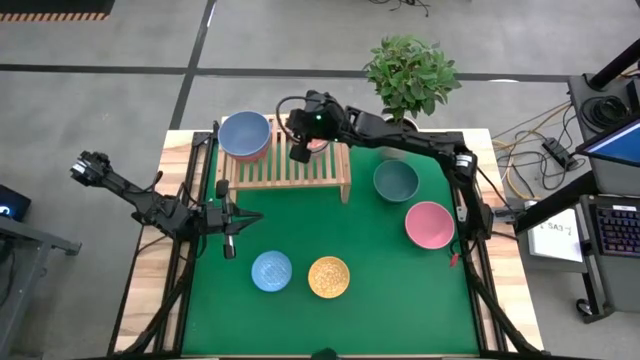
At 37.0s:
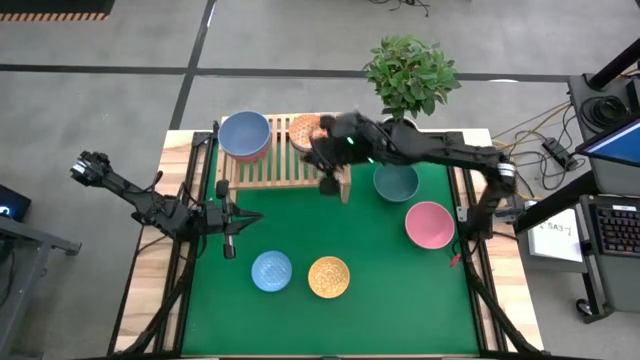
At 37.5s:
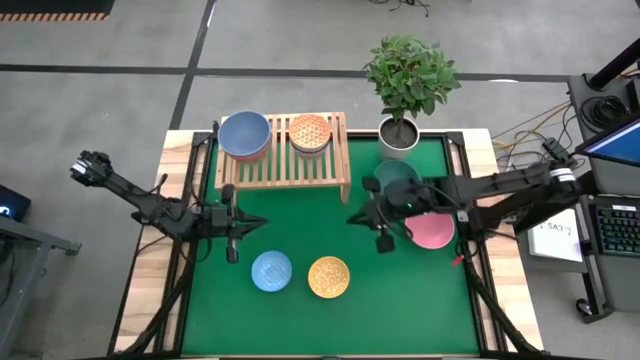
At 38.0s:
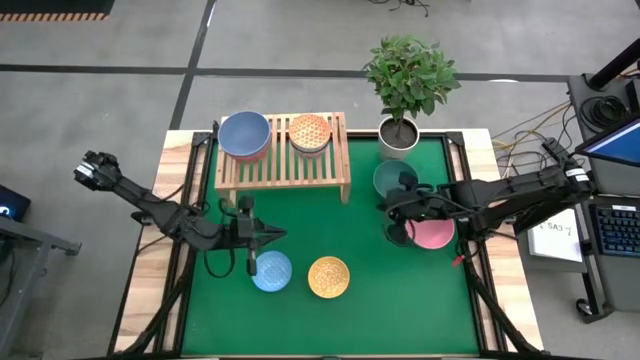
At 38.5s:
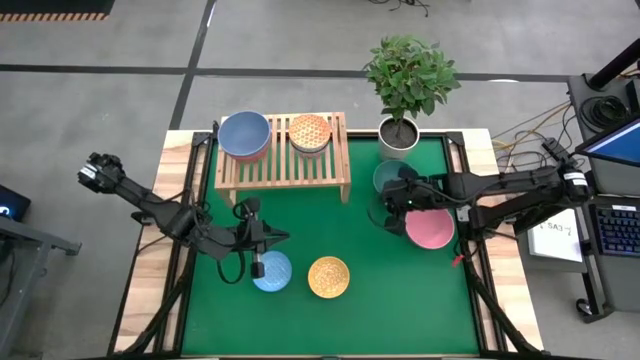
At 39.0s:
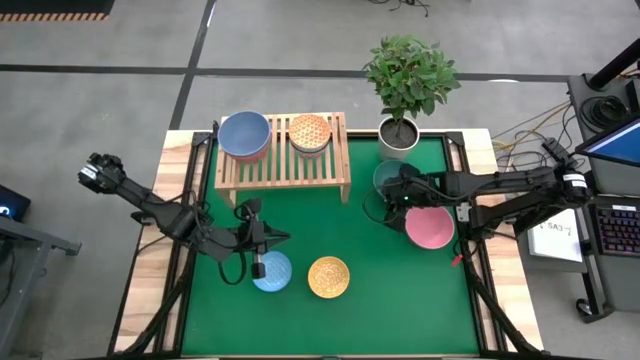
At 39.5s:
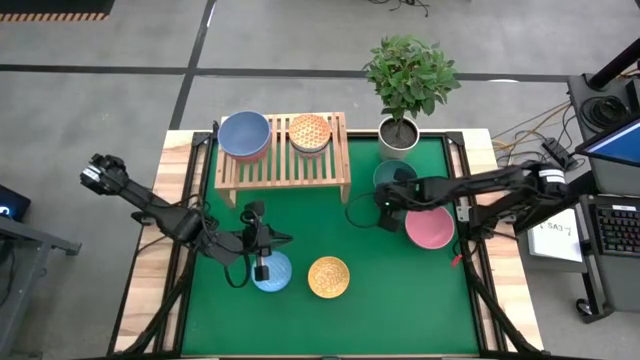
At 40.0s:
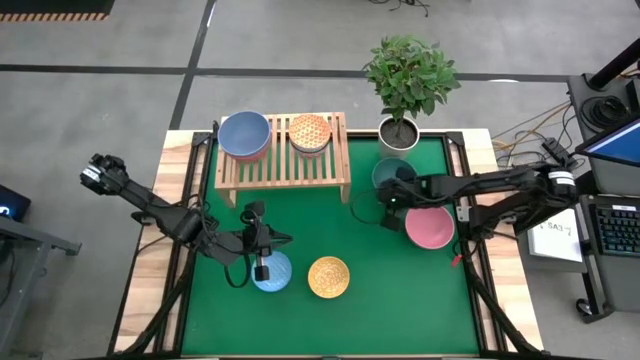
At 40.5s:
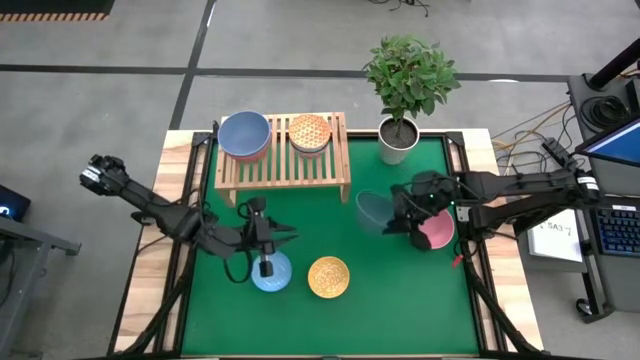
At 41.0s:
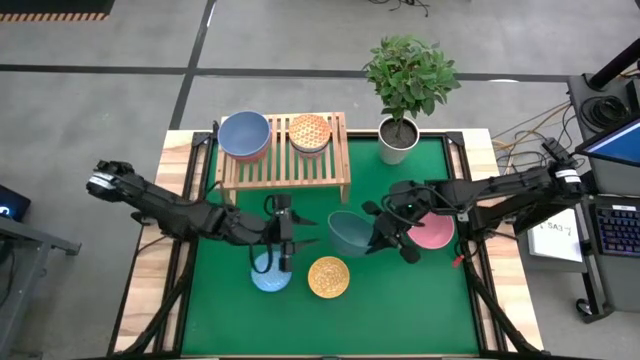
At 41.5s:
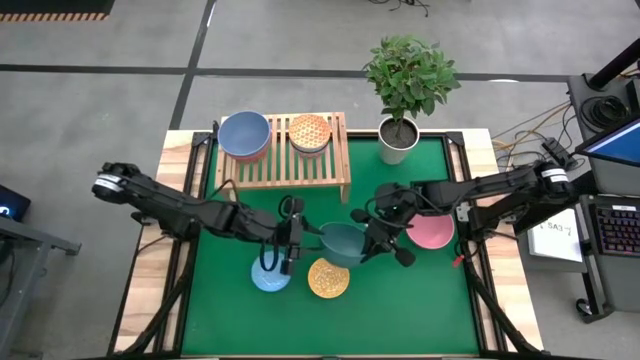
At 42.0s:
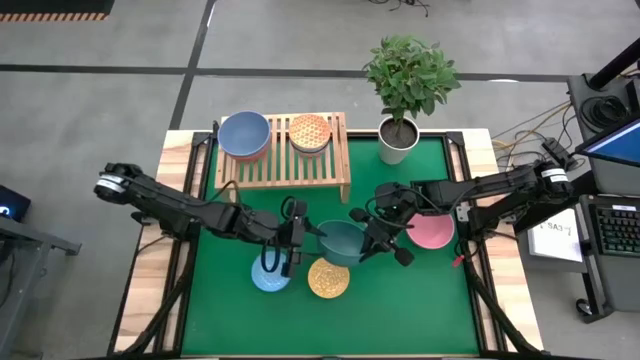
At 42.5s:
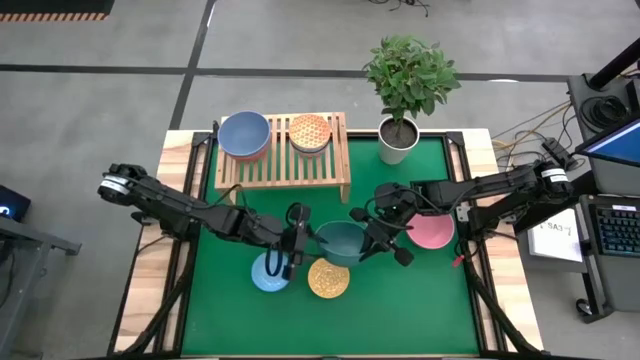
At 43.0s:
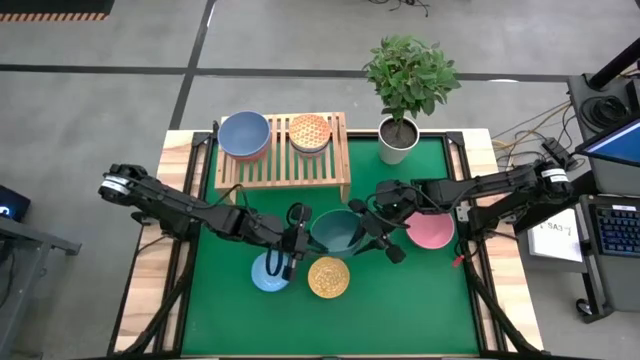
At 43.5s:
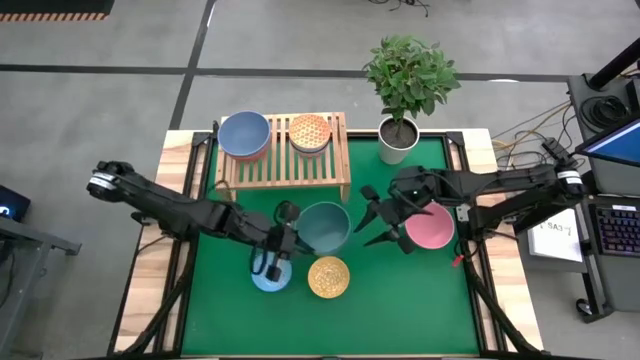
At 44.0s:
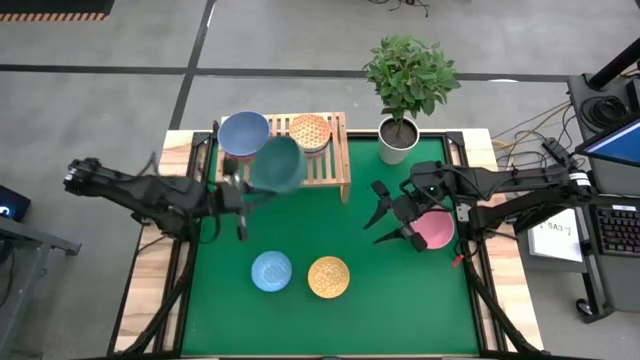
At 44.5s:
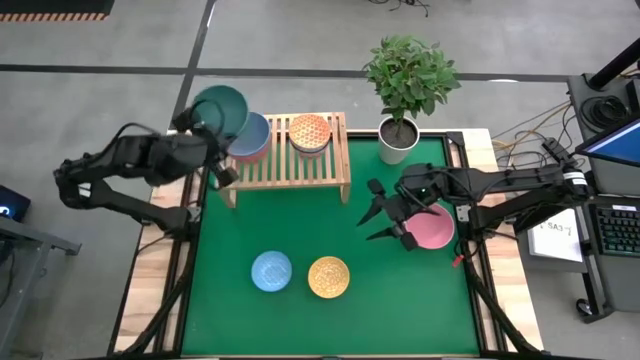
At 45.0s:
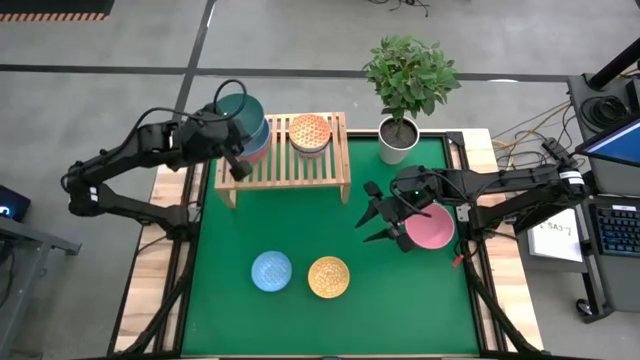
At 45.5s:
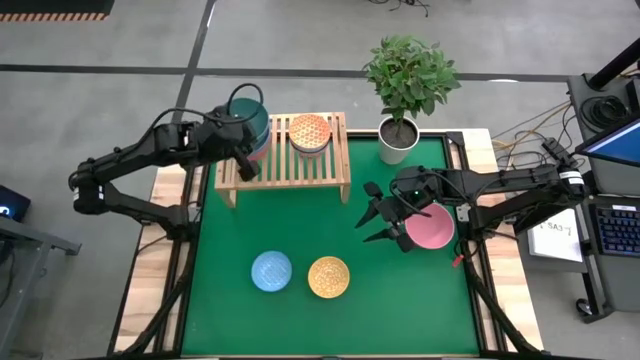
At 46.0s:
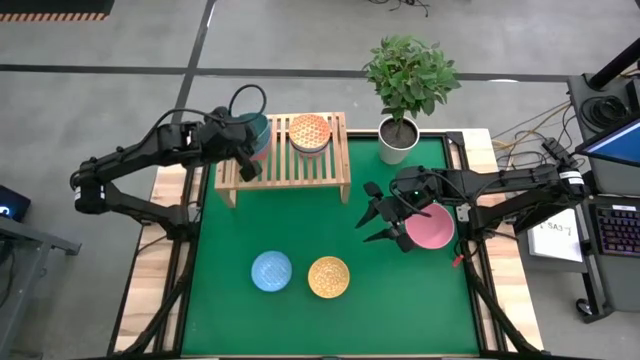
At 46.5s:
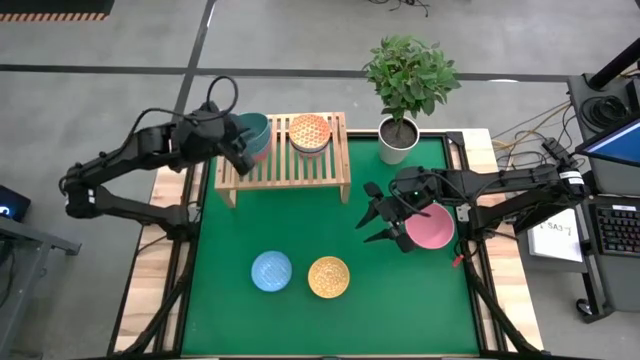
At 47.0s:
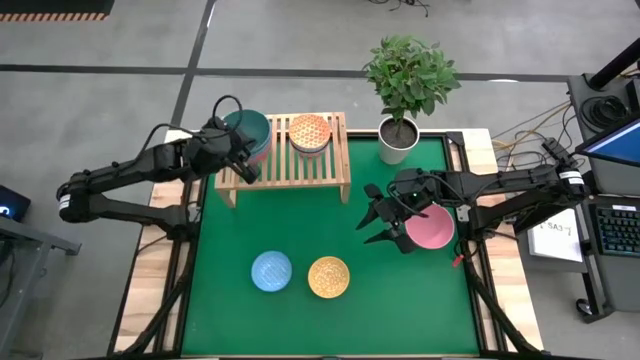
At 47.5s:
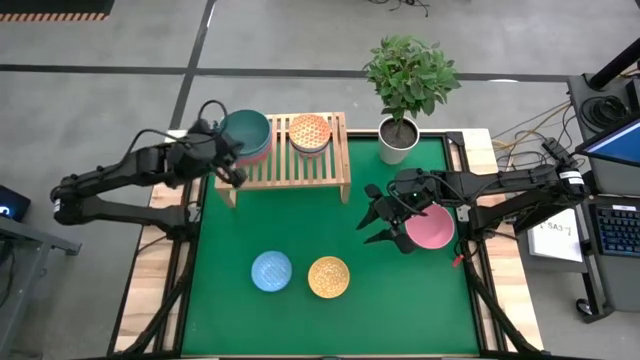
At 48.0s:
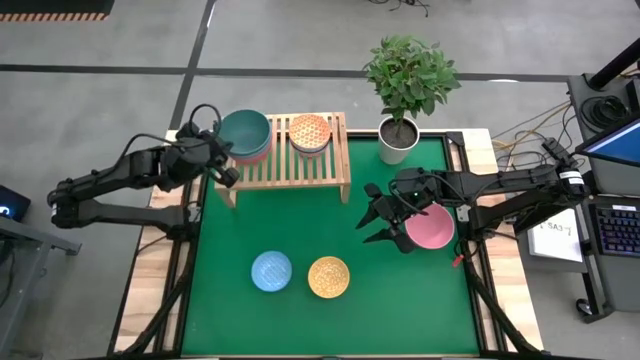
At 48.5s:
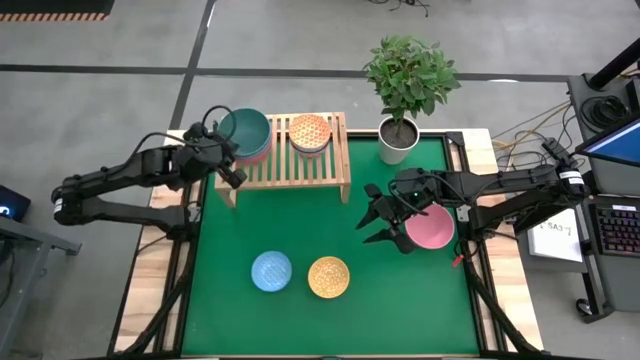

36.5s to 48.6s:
Task: Place and stack bowls onto a shelf
Stack the green bowl in the blue bowl on the shelf

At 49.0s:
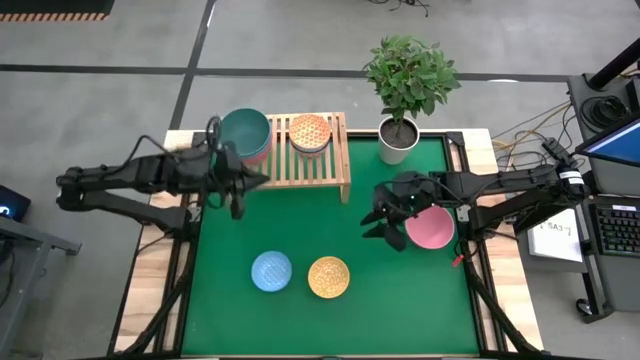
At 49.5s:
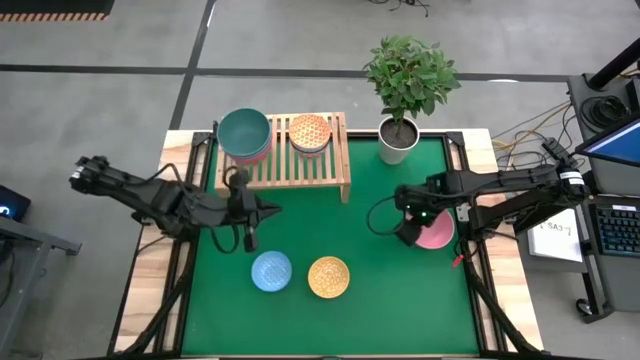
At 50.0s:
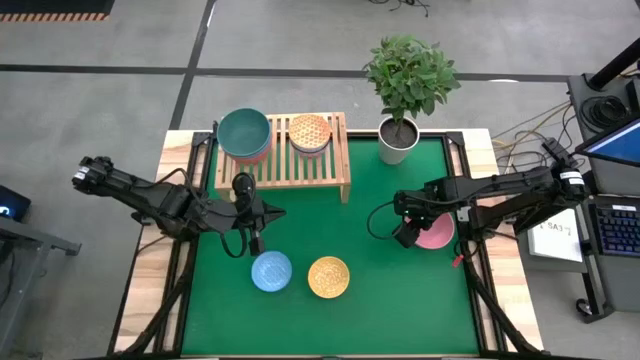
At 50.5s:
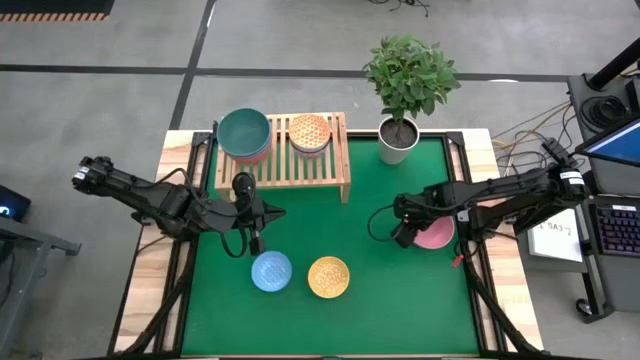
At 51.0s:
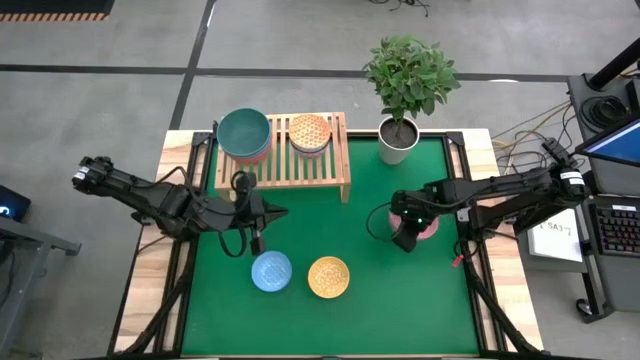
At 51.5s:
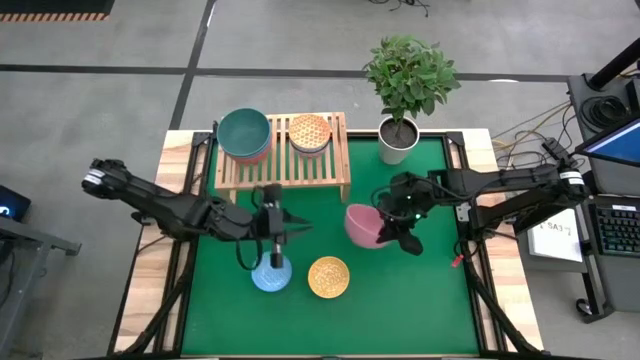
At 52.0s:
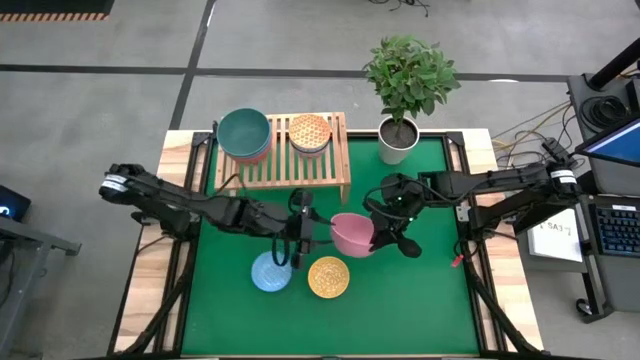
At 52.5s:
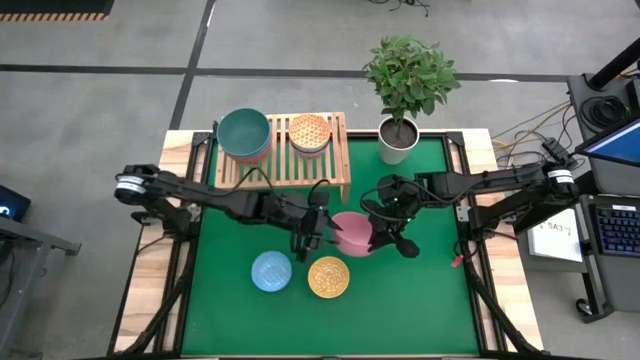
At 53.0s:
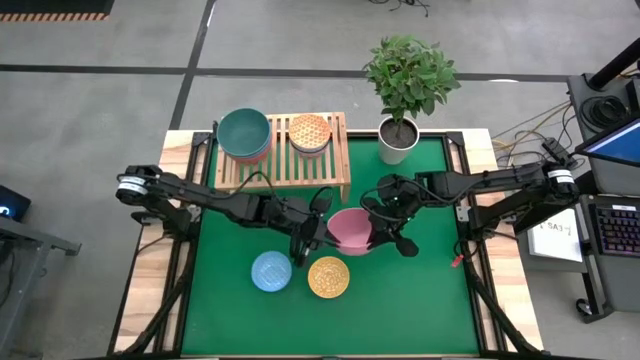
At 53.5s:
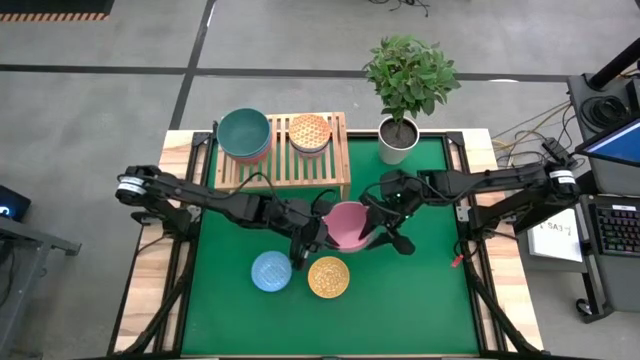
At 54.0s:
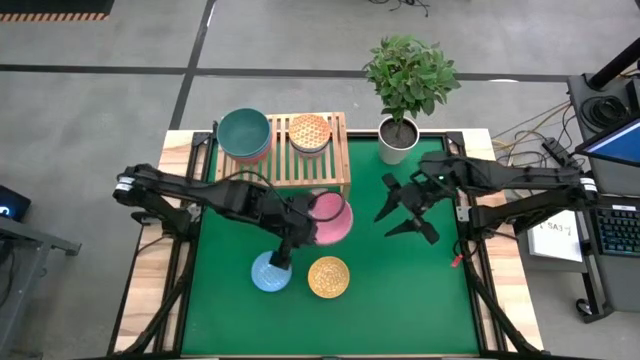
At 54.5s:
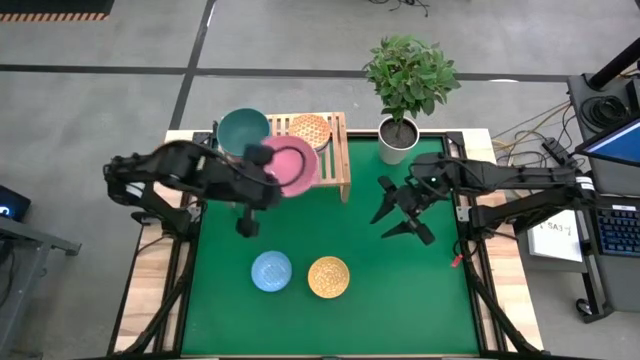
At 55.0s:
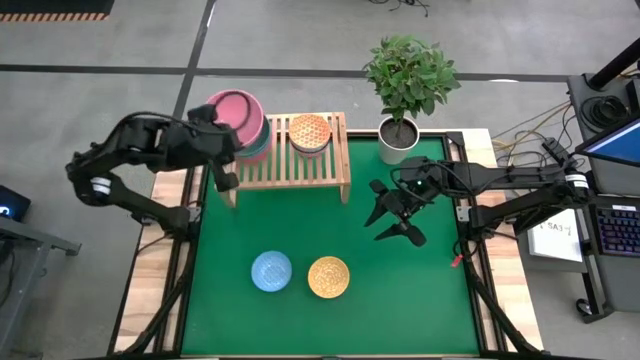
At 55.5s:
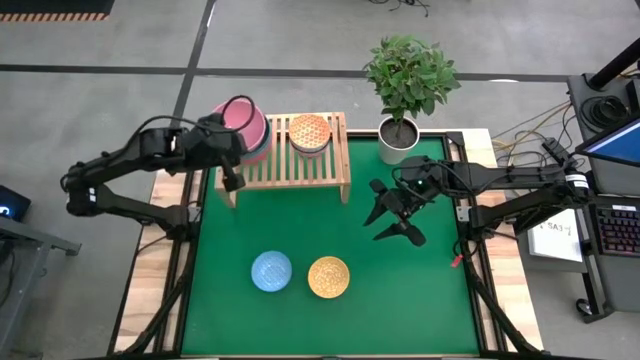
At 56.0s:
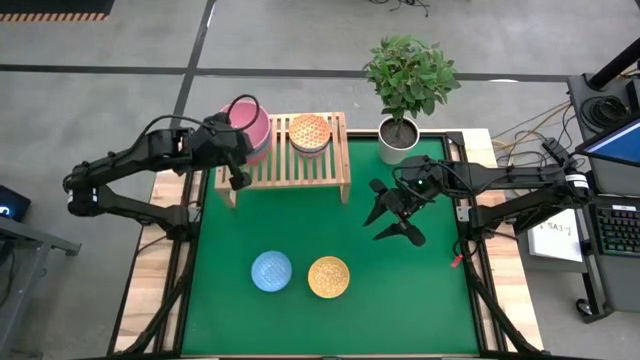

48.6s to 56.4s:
Stack the pink bowl in the green bowl on the shelf

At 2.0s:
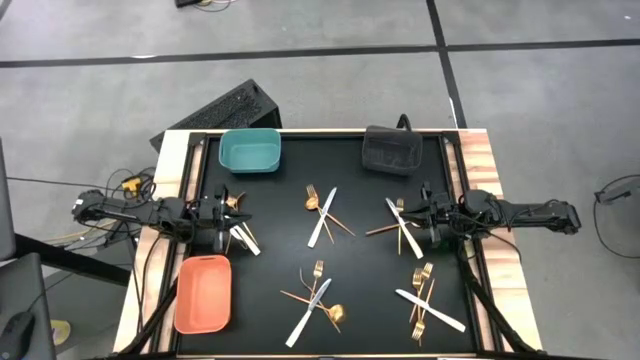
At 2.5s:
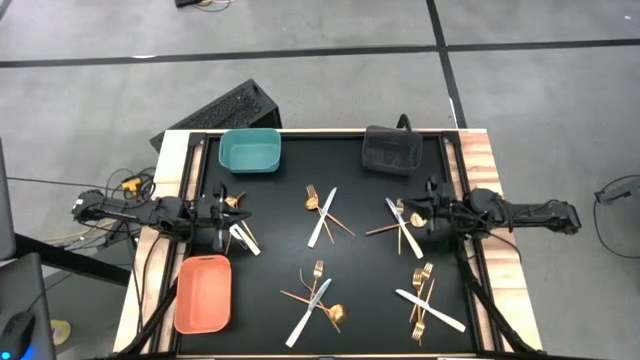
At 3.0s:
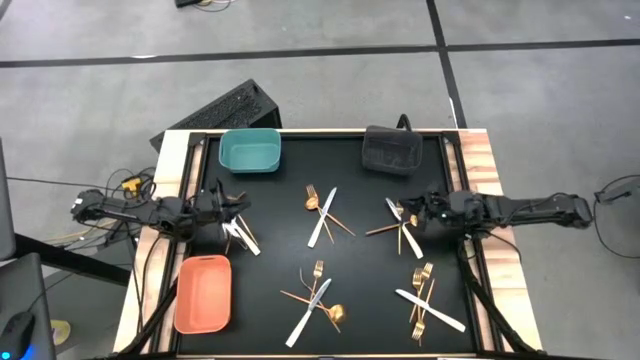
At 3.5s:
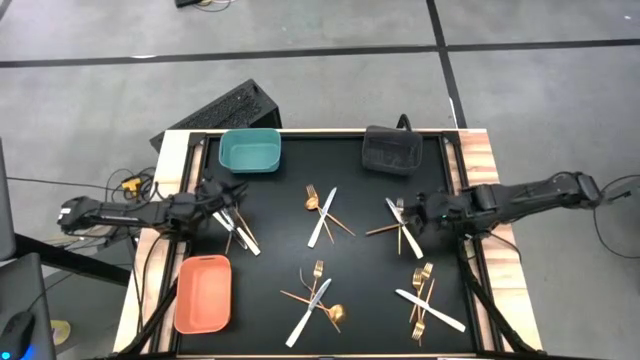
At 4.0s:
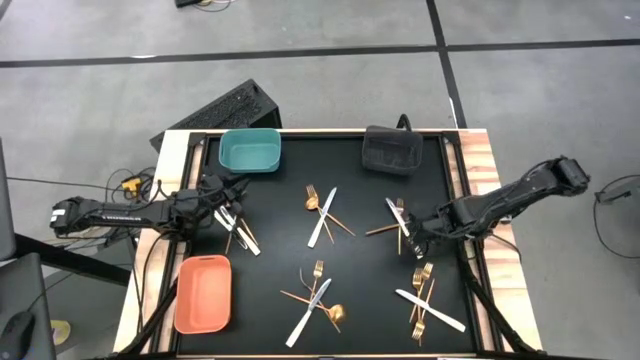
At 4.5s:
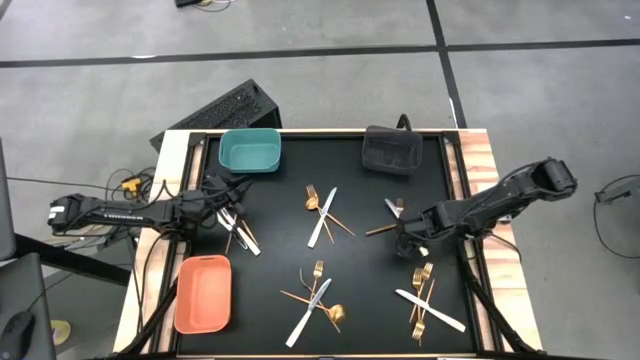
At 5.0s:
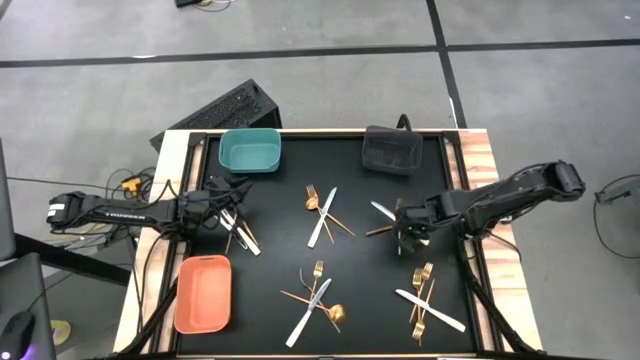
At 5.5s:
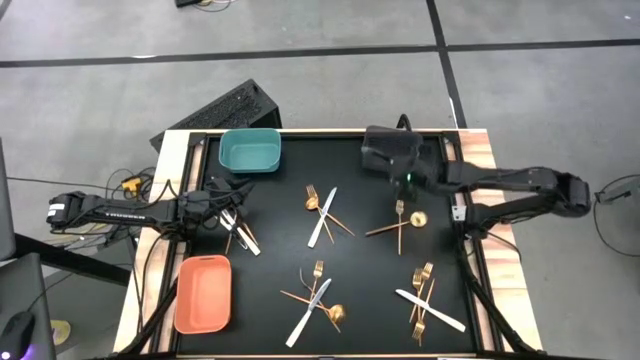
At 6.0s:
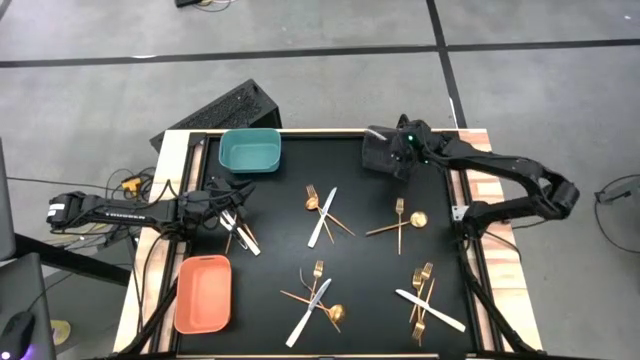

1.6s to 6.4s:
Task: Sort silverware by color (type)
Put the yellow table knife into the black bin
